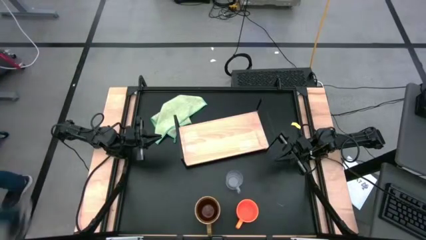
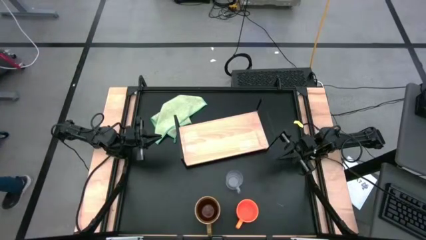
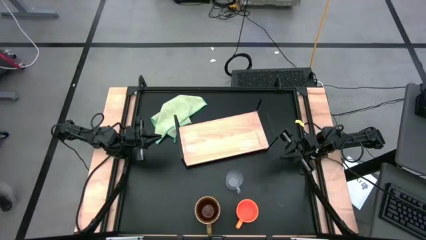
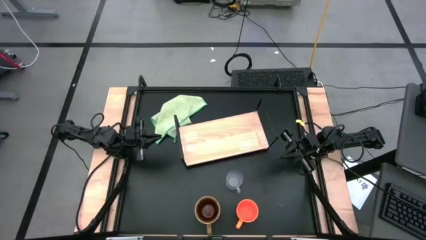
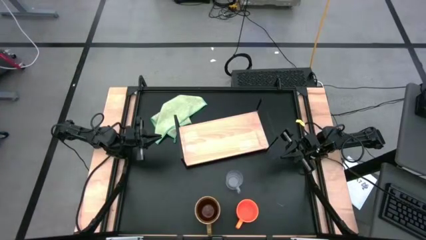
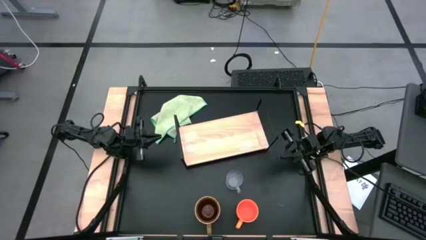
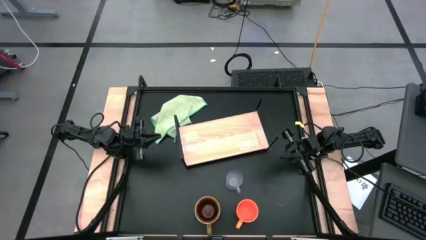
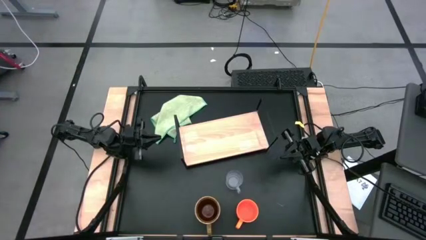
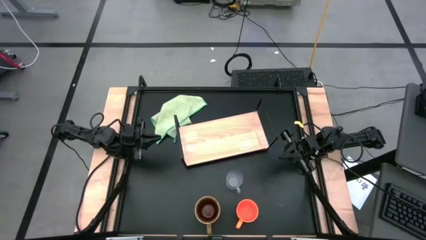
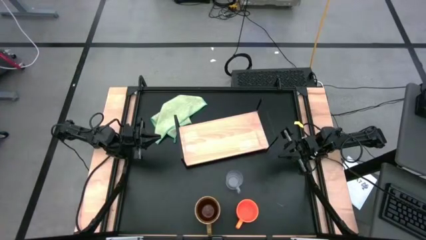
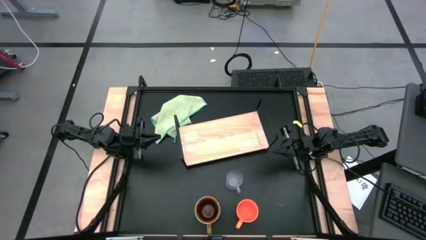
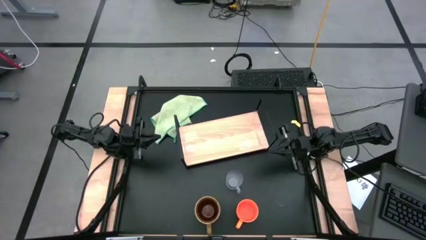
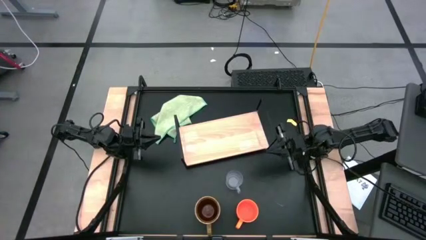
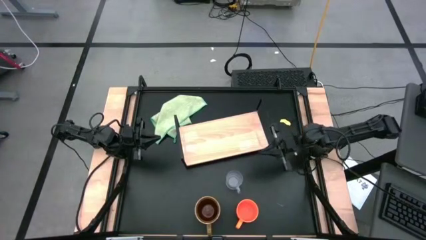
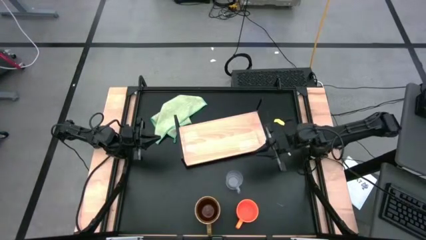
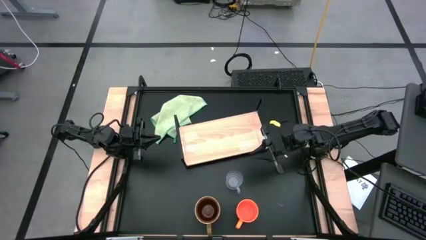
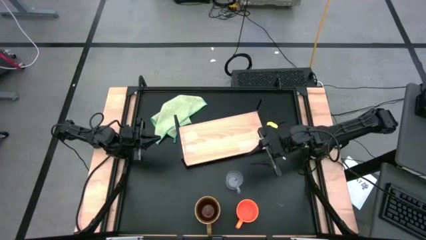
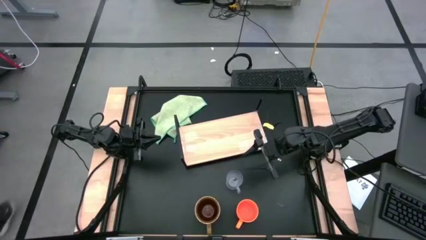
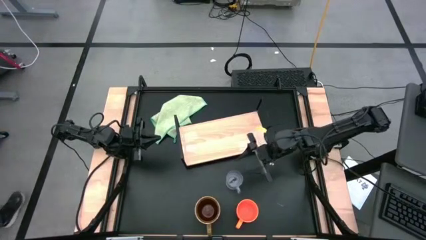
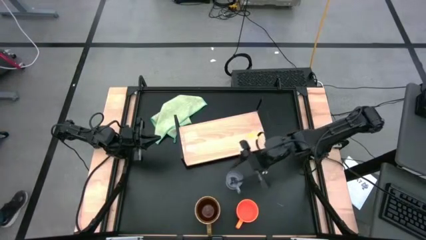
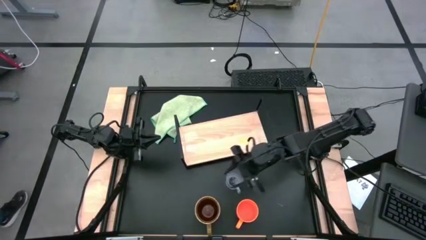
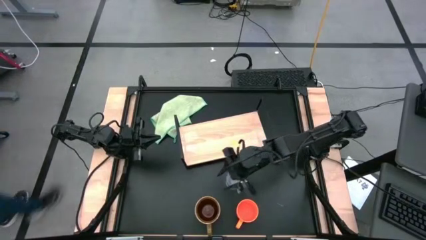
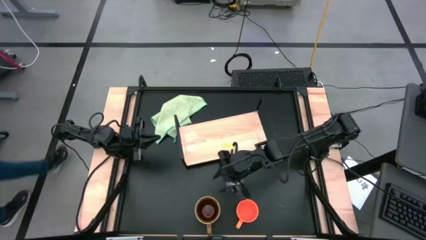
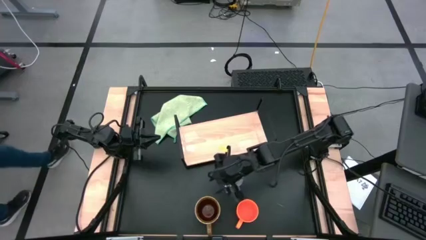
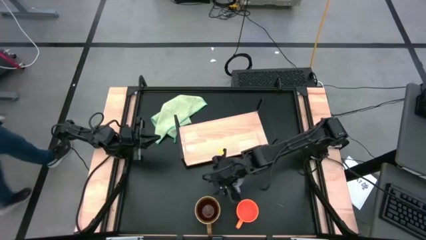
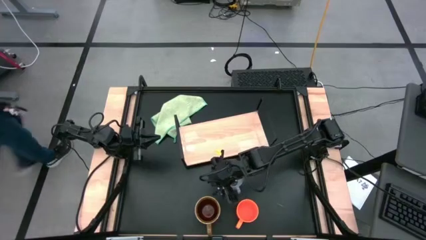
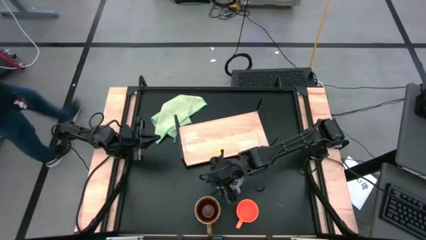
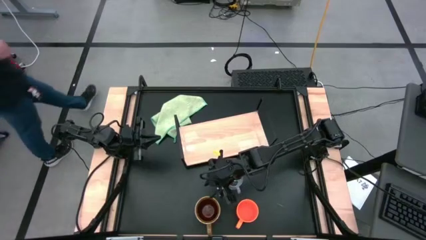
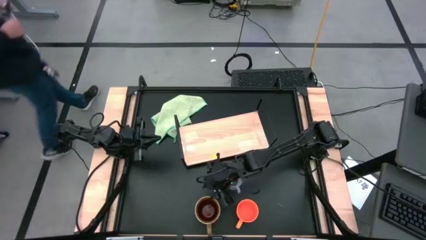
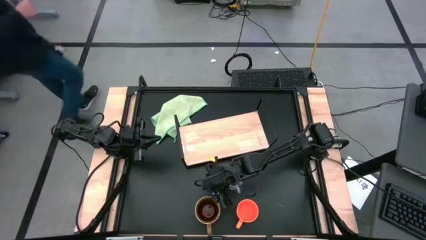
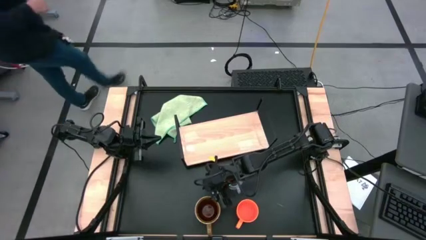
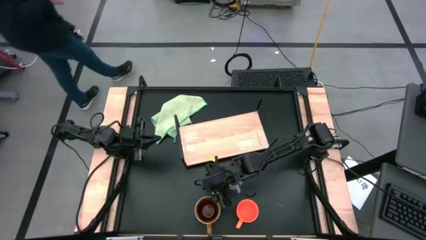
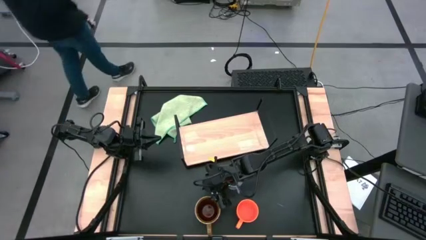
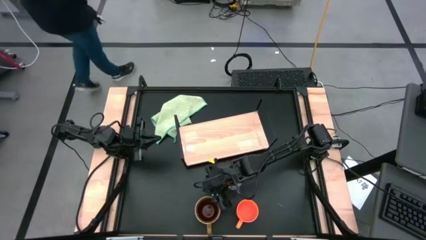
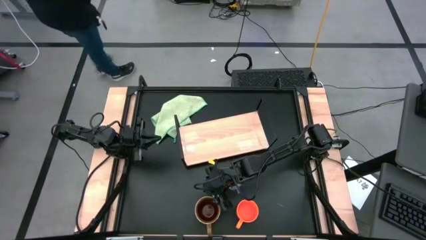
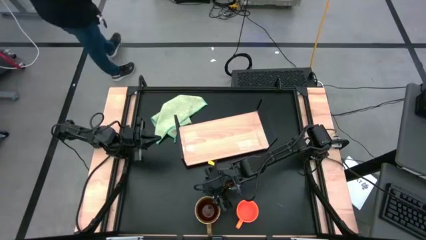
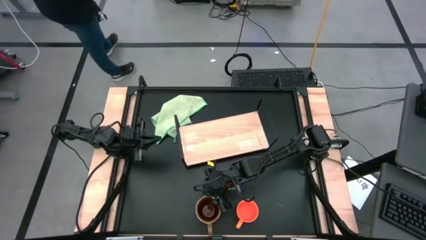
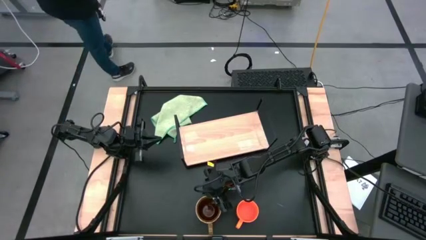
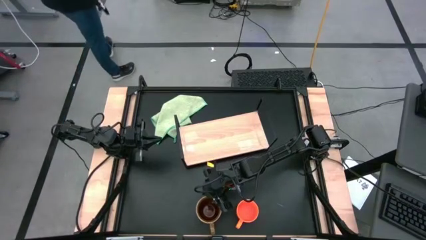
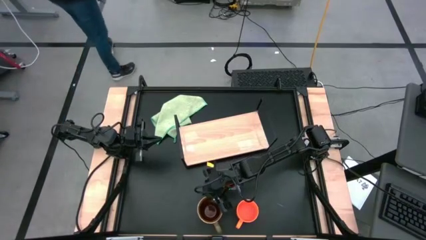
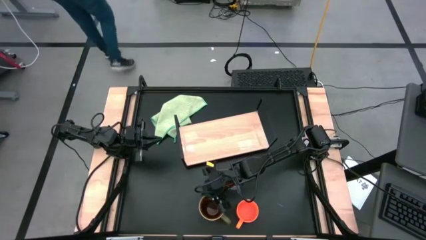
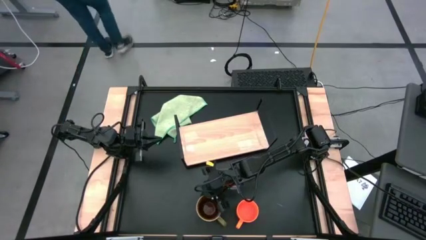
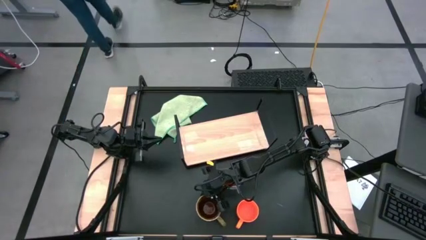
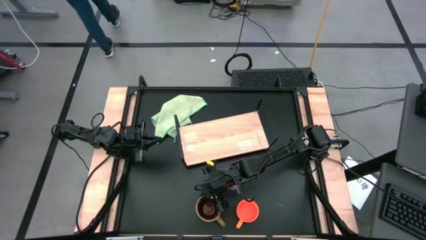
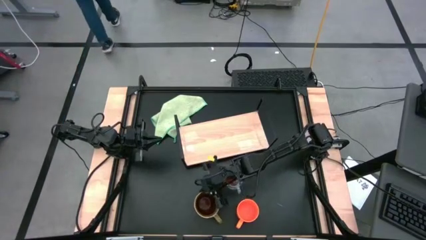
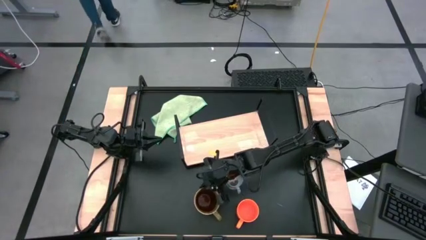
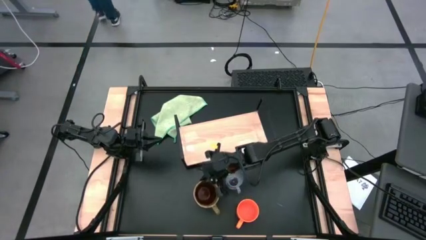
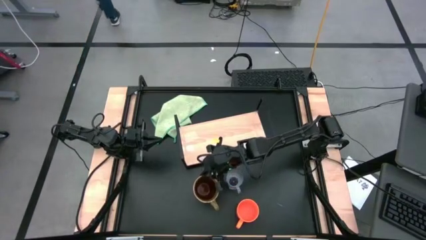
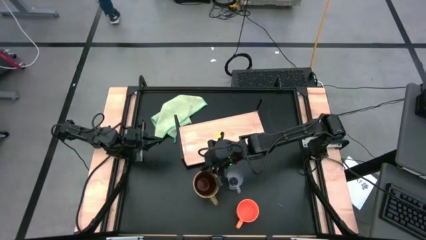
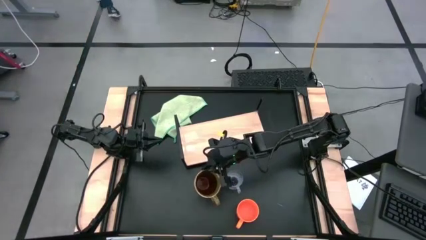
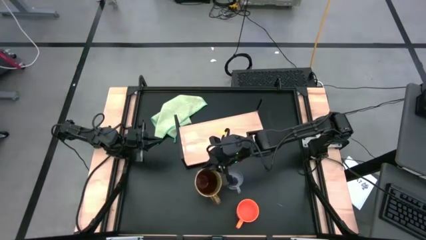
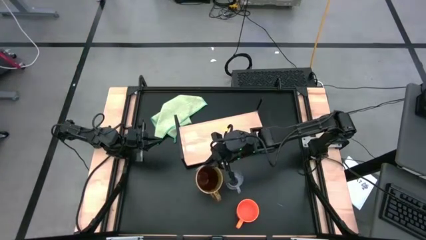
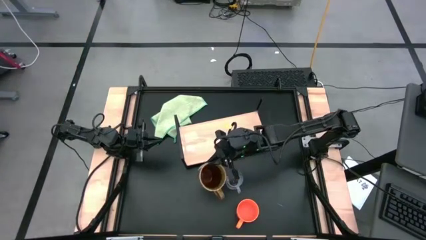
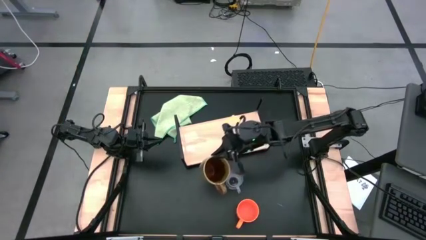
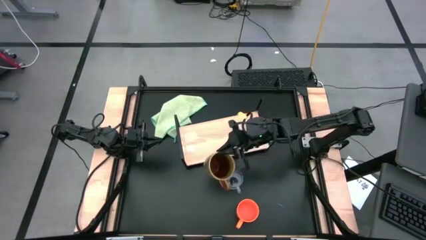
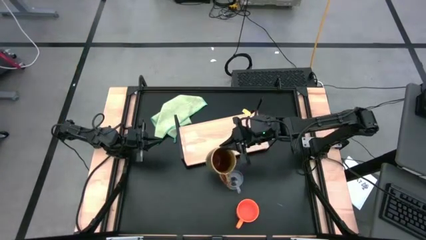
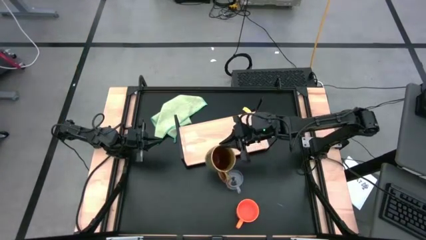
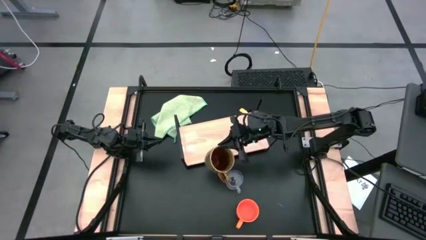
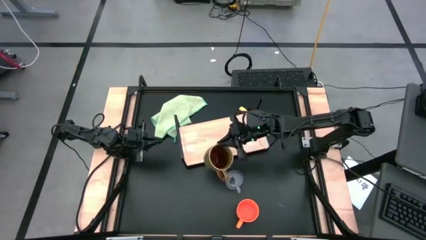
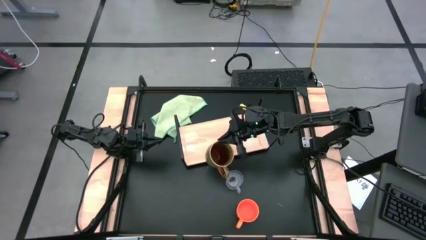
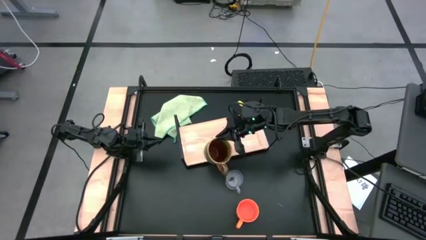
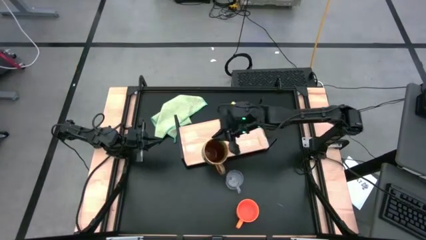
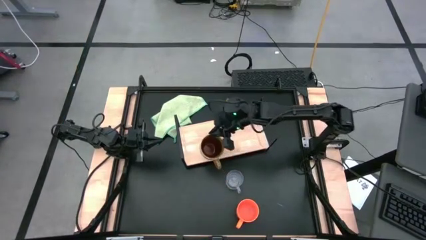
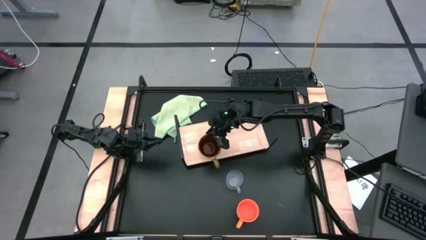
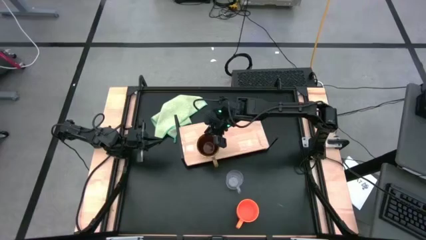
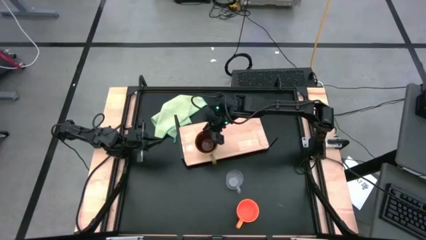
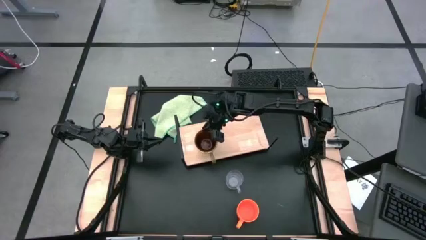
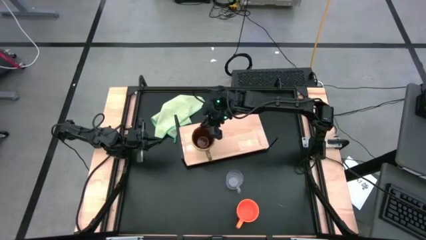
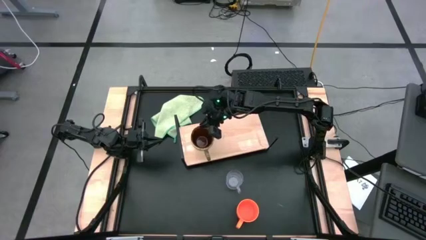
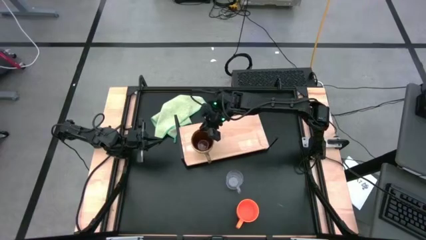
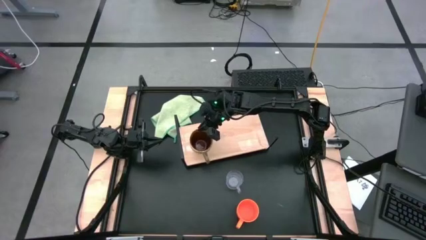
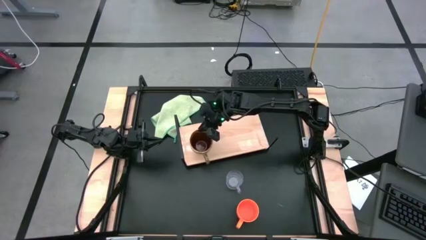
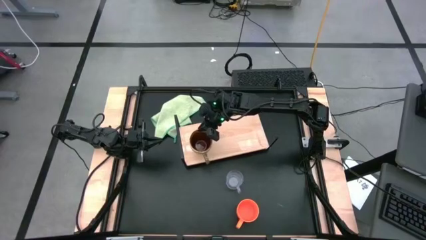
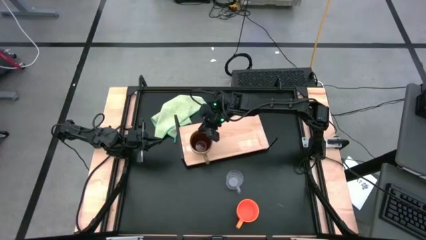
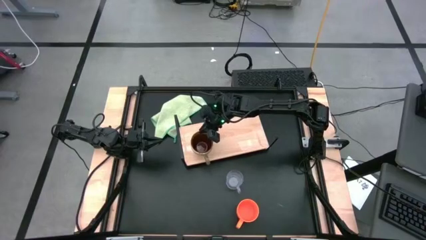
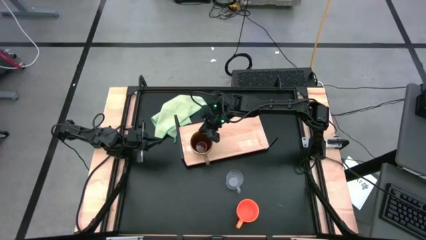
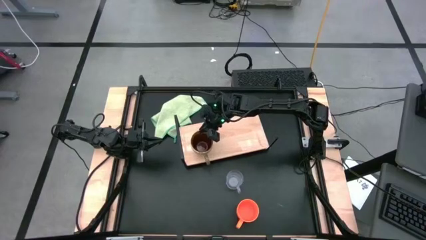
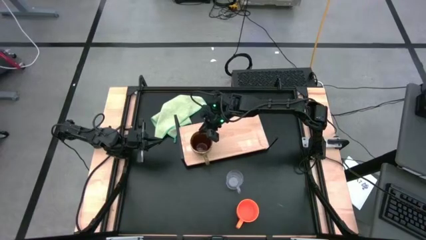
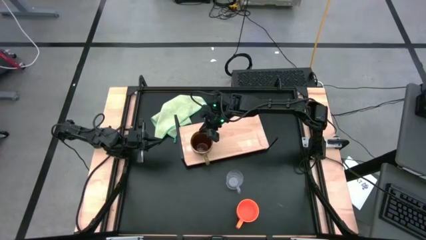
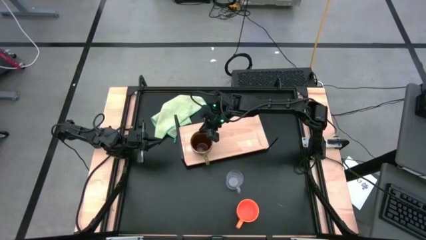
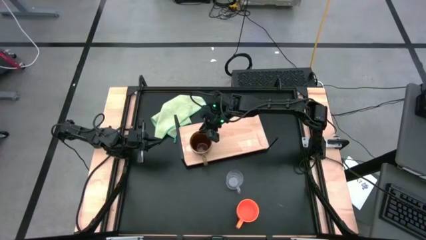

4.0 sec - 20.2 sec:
Task: Stack small to large cups/mugs on shelf
Put the brown mug on the shelf
